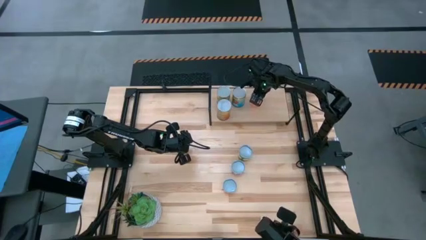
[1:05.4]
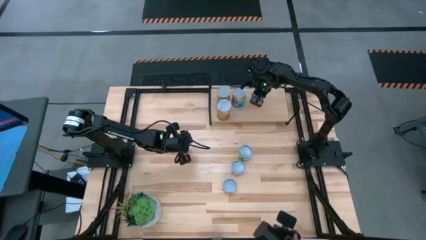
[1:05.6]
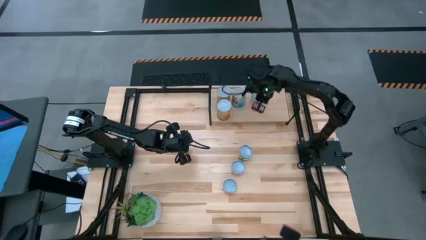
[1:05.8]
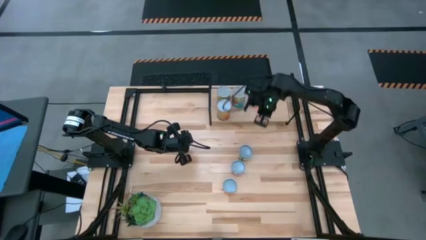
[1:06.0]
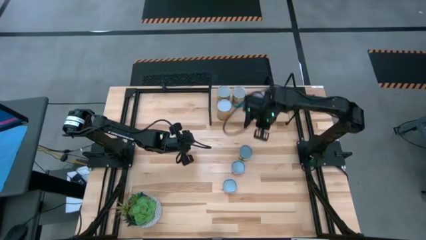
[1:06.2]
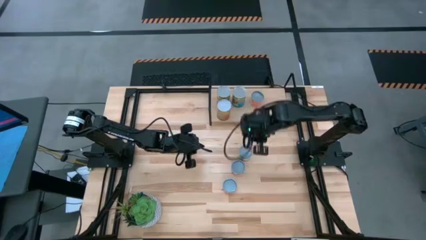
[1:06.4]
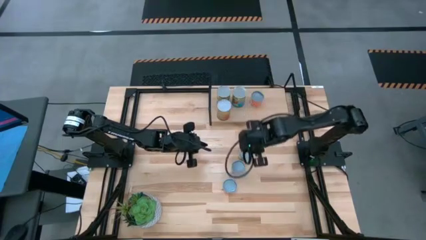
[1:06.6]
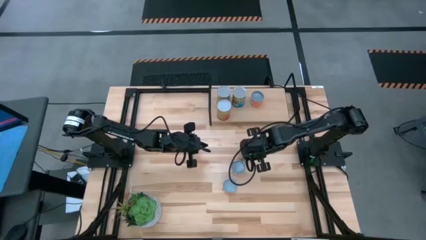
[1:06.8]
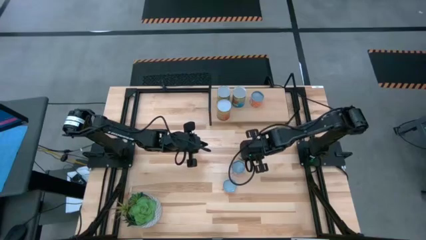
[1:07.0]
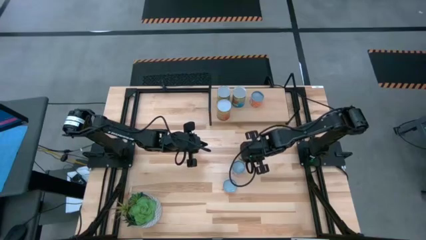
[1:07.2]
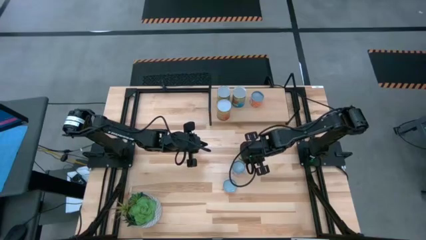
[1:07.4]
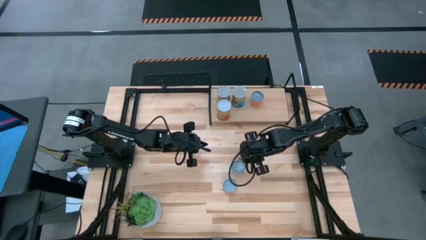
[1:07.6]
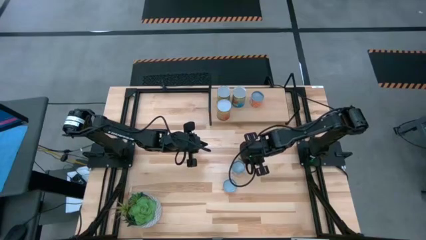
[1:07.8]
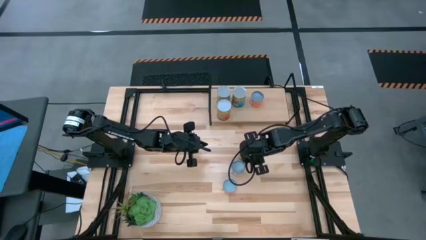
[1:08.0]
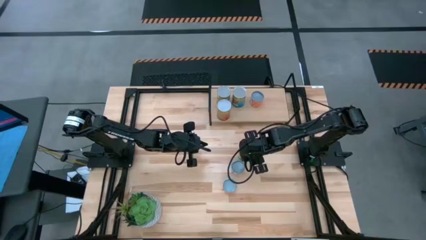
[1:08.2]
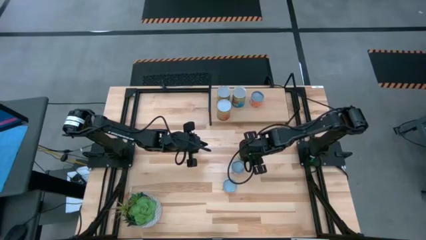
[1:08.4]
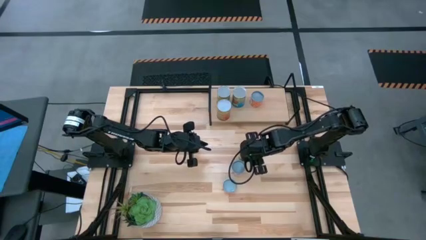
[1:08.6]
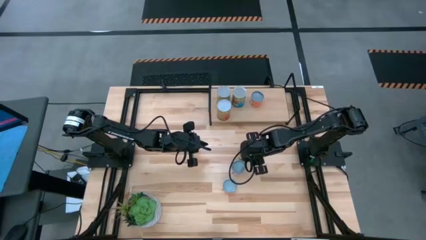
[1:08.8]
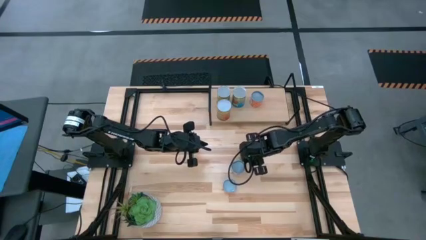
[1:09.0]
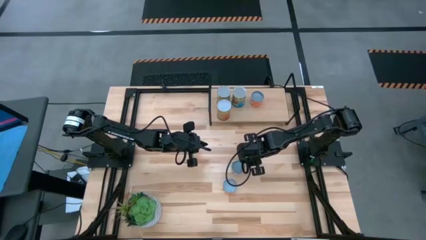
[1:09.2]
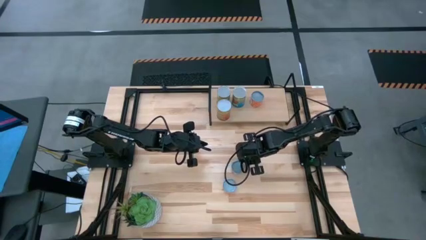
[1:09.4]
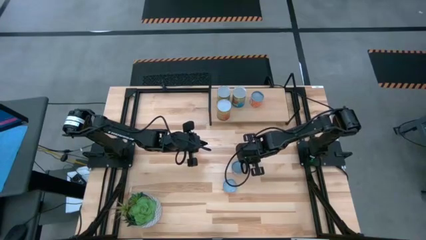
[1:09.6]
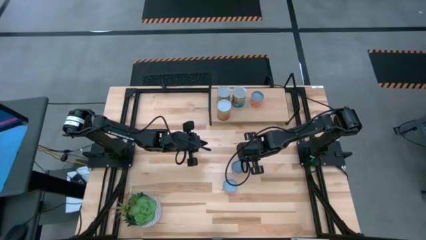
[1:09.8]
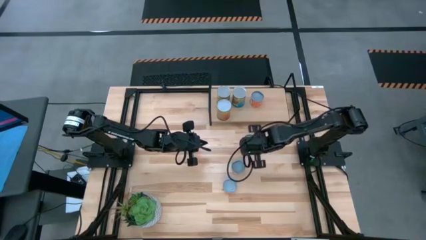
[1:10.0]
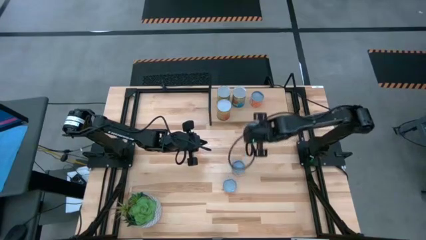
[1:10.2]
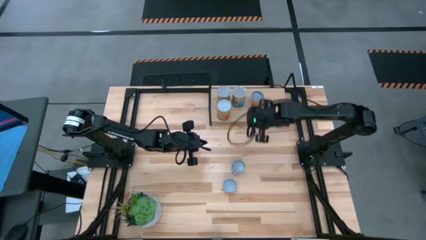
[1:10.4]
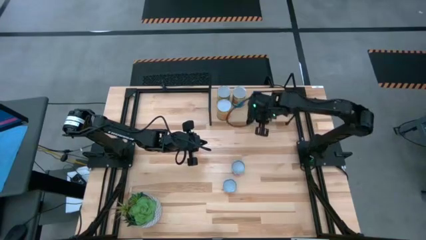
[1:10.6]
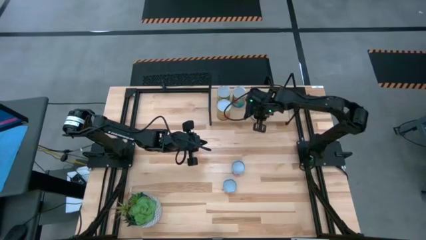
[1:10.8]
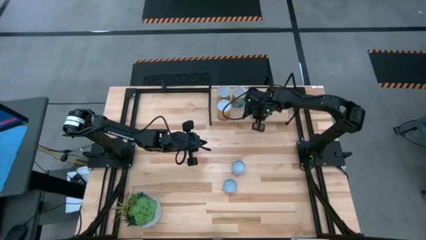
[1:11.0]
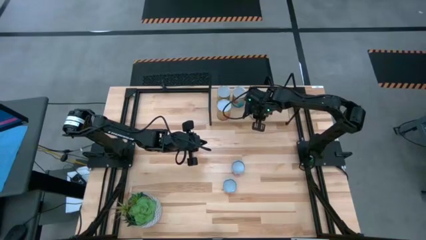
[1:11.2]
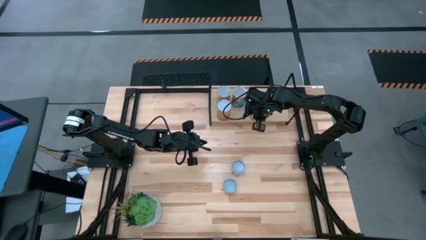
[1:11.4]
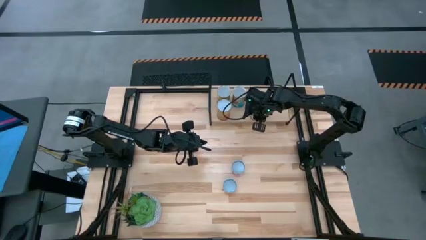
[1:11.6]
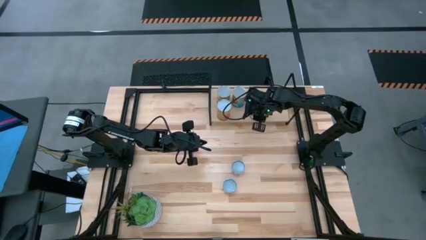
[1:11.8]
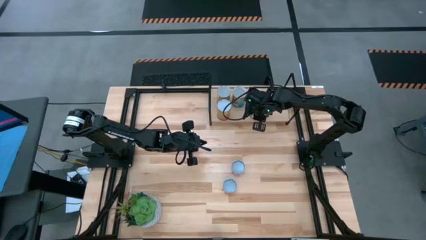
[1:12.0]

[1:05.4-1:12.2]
Task: Pick and place cans onto a shelf
Put the canned peaches on the shelf

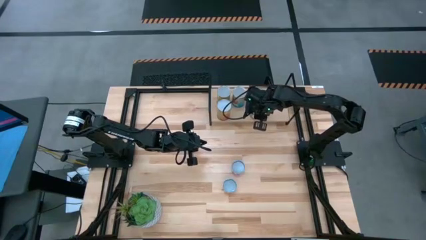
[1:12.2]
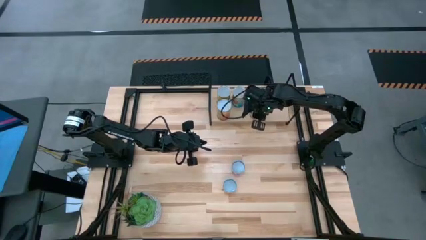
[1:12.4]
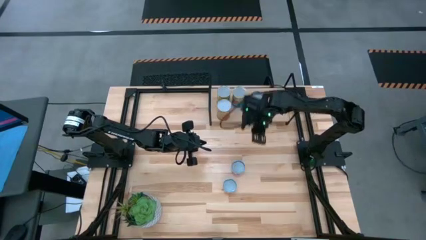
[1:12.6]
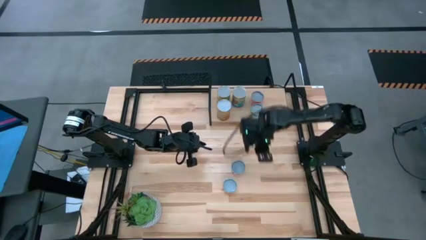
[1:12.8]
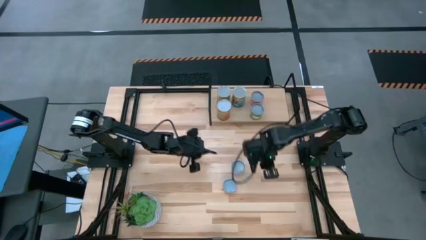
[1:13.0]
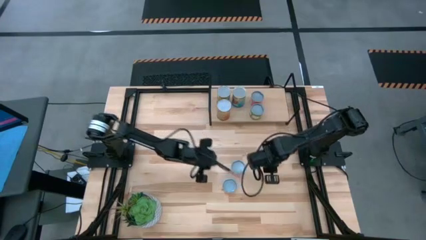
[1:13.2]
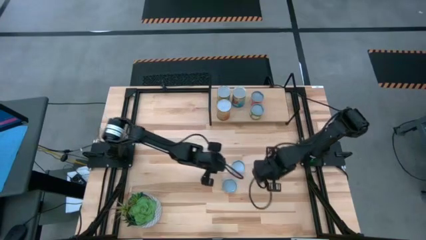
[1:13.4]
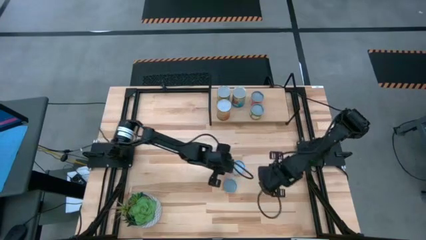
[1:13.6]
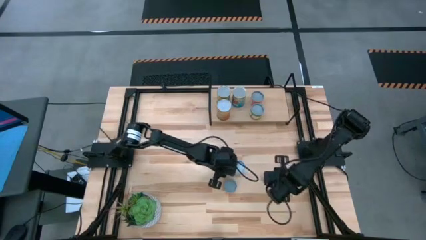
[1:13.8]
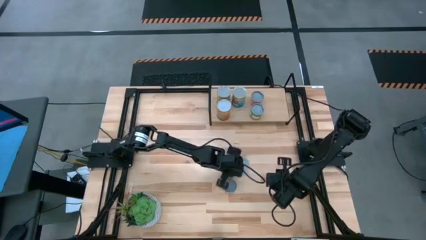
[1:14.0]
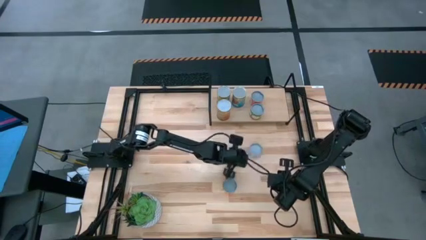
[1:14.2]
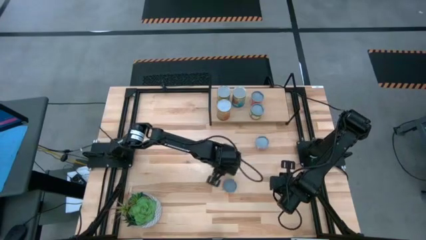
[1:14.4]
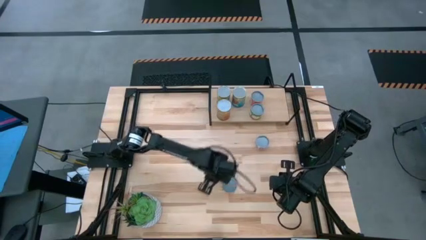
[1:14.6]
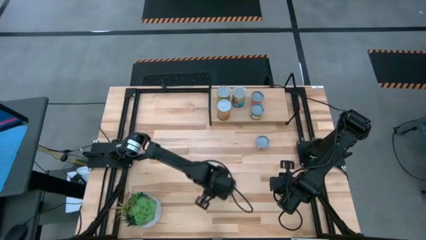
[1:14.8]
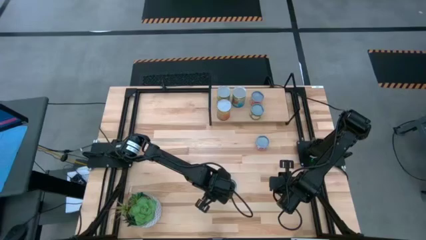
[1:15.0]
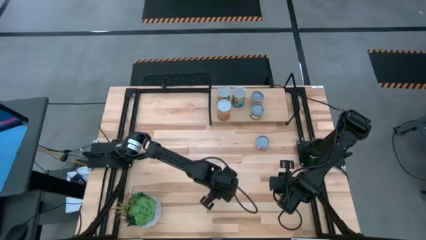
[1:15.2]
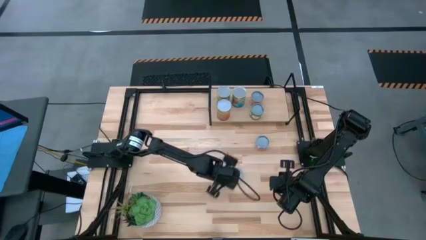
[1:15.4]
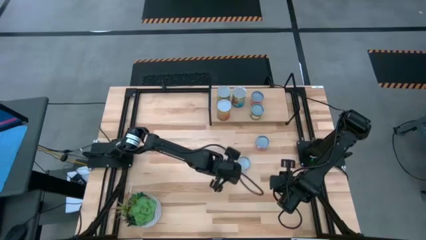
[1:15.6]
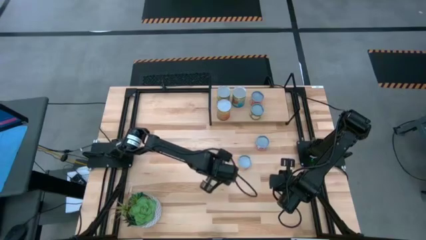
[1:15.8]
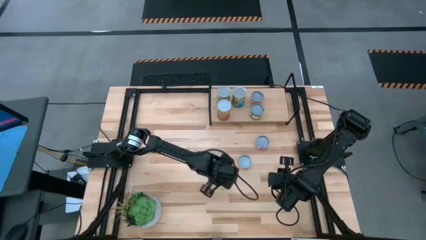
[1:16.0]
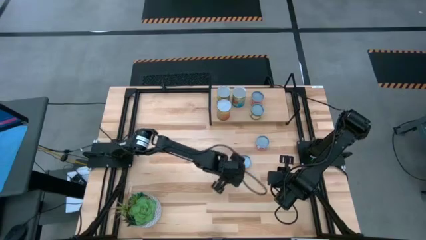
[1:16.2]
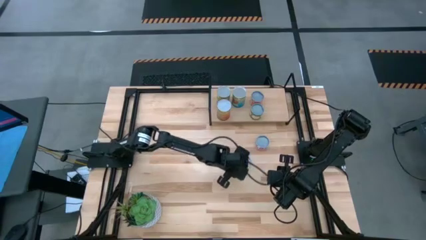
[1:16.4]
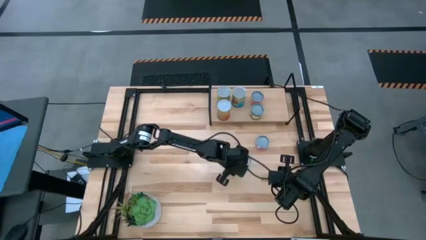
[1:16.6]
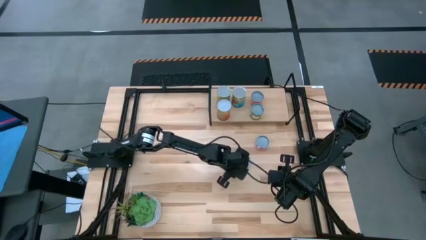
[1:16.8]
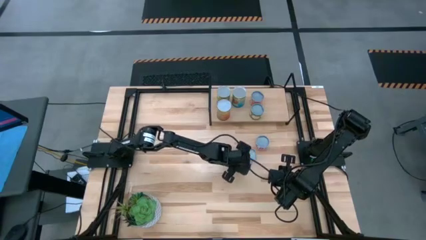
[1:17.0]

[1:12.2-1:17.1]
Move the canned goods

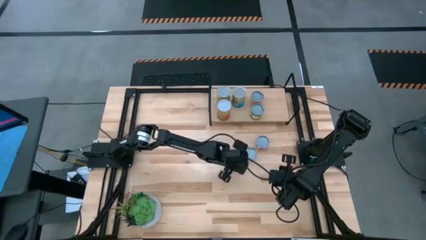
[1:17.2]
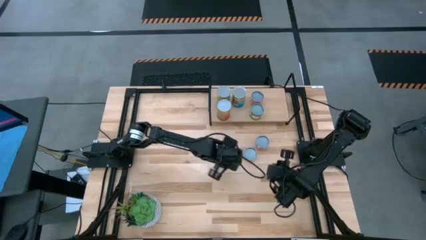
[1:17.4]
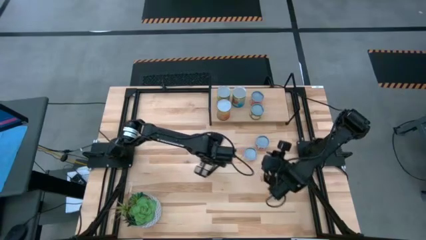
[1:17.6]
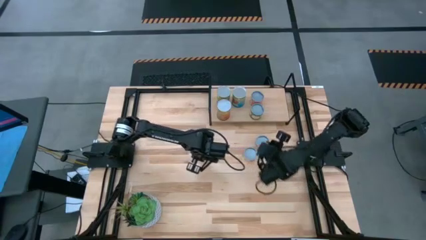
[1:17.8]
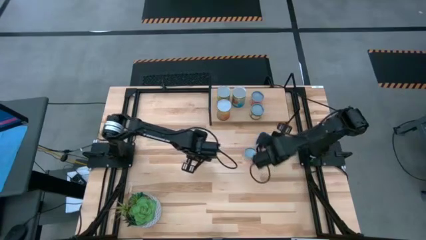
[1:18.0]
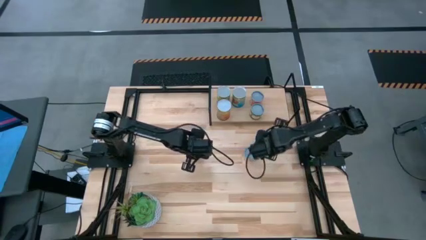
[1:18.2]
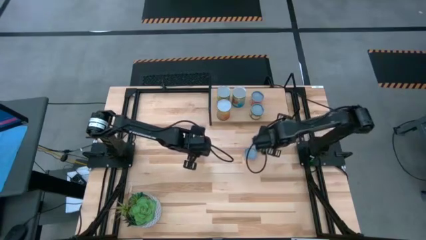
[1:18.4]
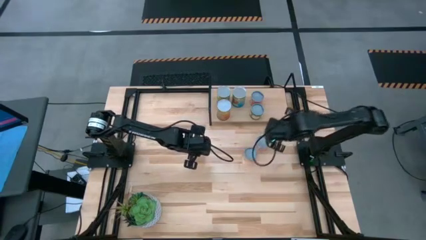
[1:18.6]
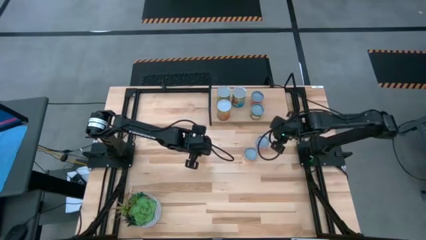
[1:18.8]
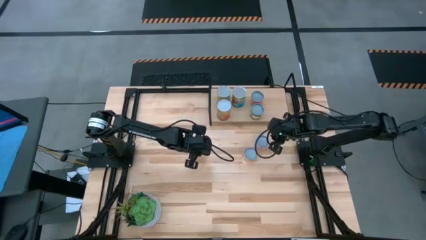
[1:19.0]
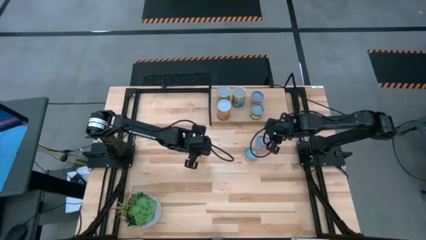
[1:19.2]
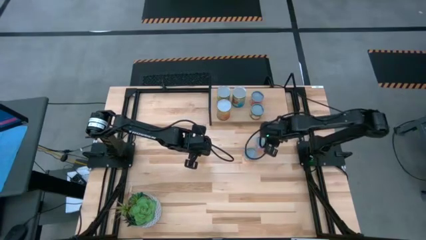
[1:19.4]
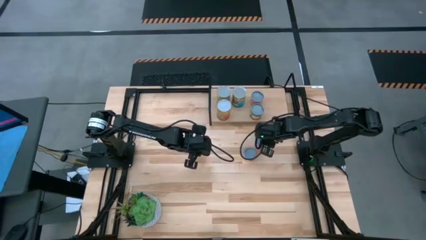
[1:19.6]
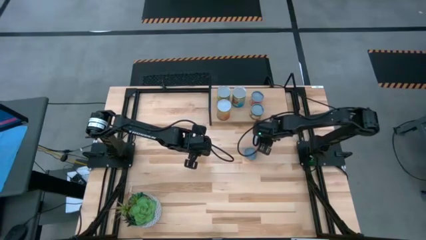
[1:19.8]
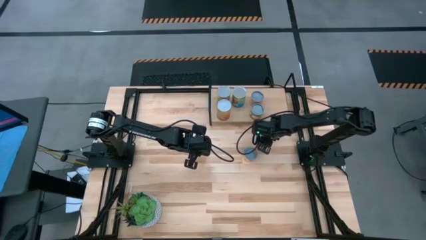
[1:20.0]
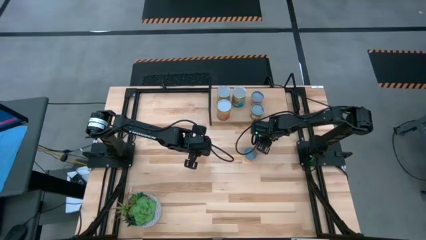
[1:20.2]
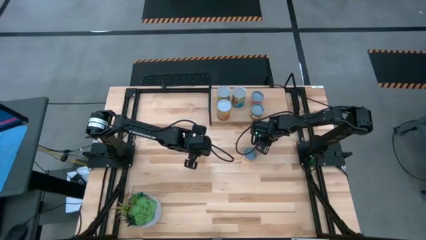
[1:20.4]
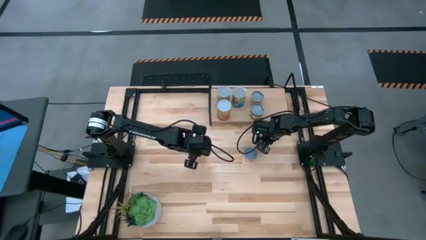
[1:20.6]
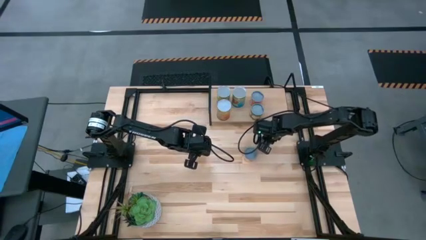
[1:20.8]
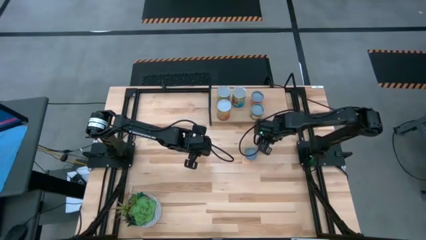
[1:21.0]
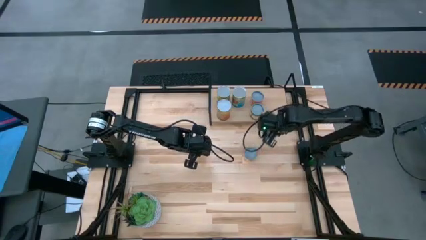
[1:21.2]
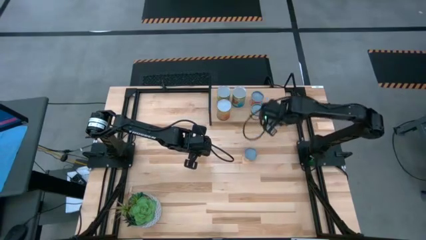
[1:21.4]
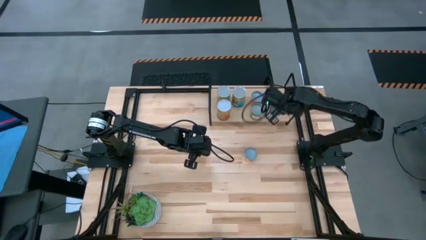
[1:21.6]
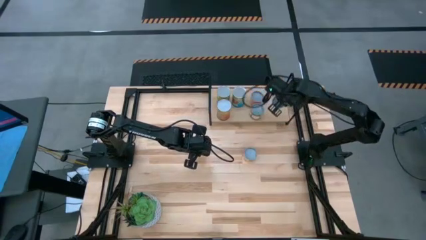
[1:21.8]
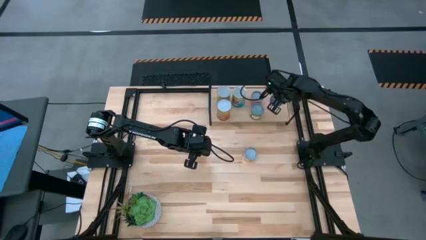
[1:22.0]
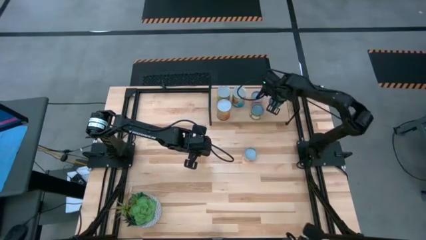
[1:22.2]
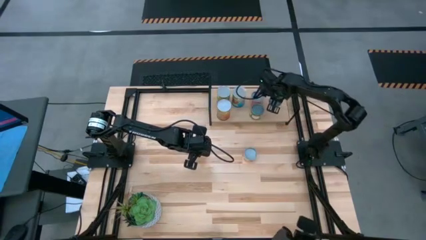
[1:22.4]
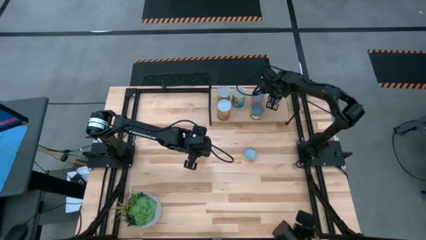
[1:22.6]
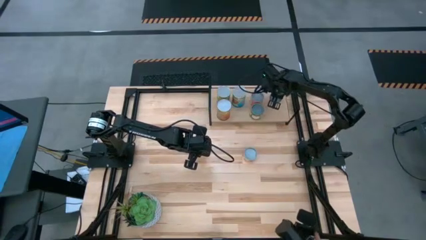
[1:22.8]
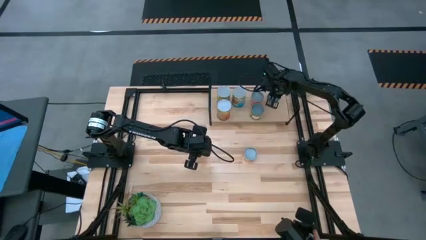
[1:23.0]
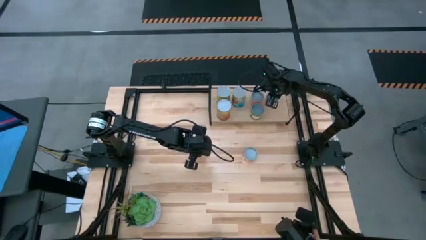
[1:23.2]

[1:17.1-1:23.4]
Put the canned tuna on the shelf
